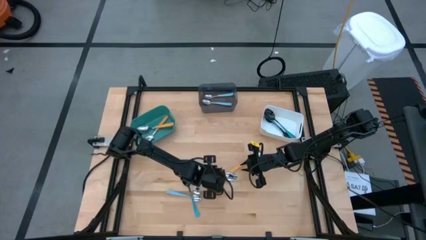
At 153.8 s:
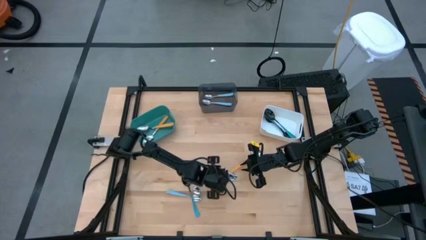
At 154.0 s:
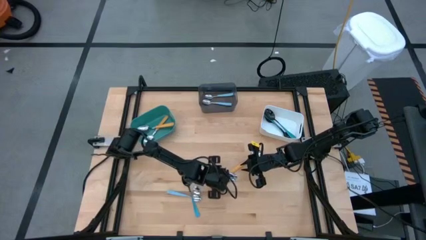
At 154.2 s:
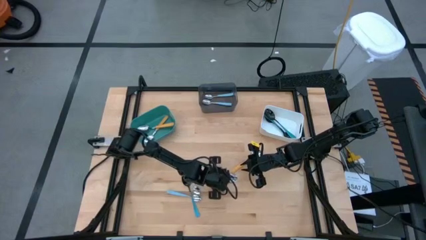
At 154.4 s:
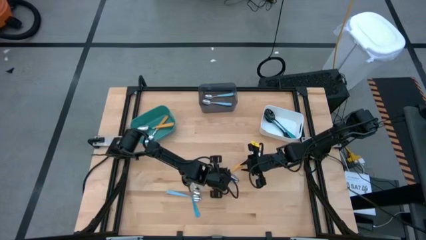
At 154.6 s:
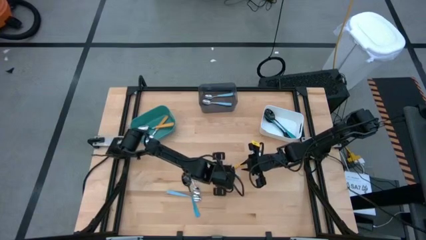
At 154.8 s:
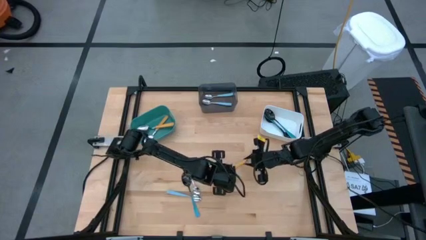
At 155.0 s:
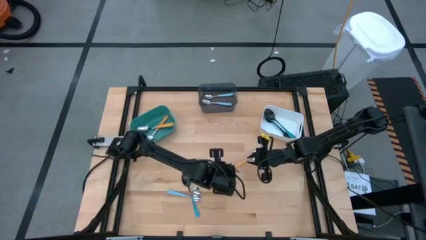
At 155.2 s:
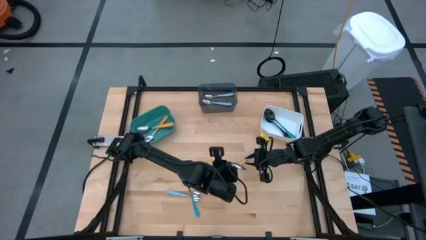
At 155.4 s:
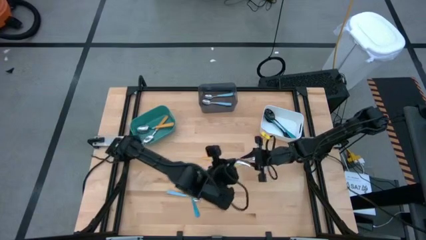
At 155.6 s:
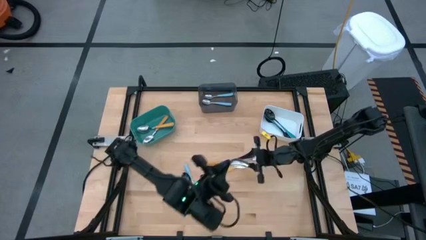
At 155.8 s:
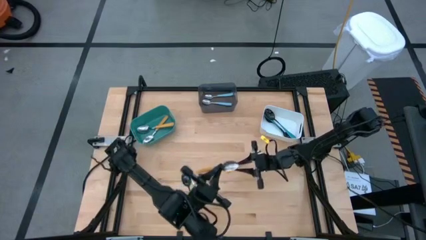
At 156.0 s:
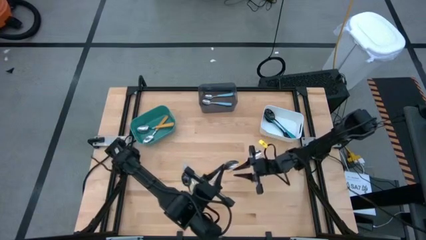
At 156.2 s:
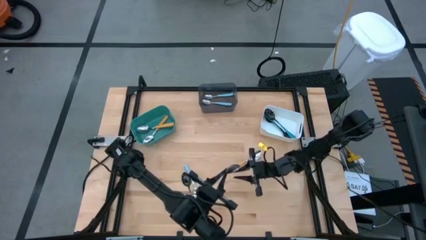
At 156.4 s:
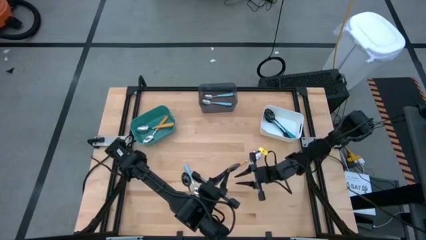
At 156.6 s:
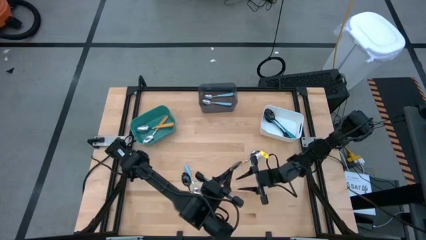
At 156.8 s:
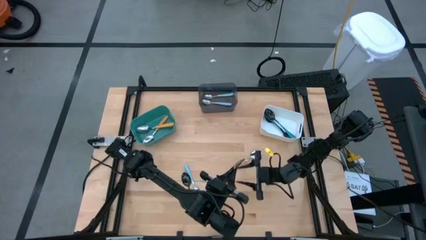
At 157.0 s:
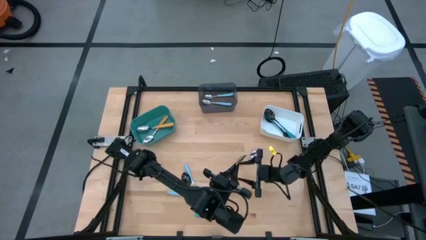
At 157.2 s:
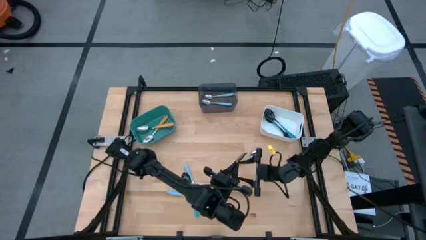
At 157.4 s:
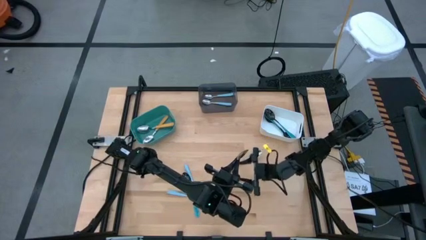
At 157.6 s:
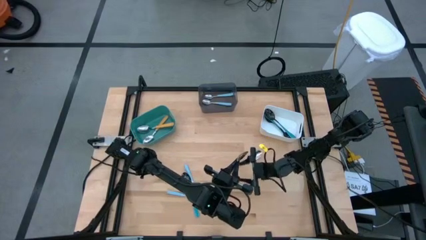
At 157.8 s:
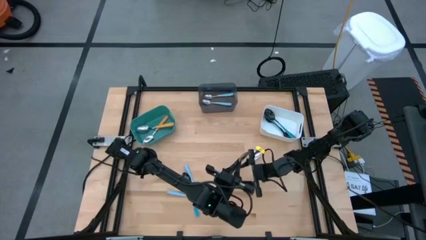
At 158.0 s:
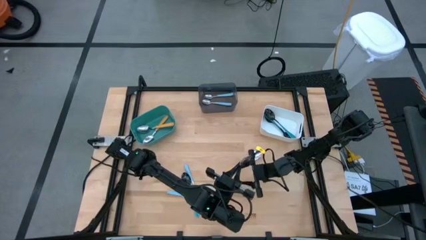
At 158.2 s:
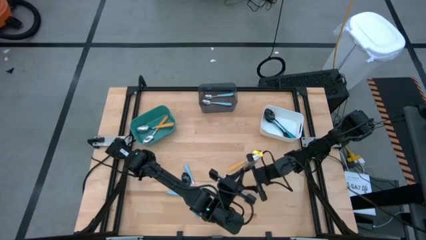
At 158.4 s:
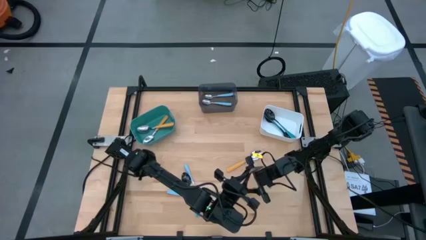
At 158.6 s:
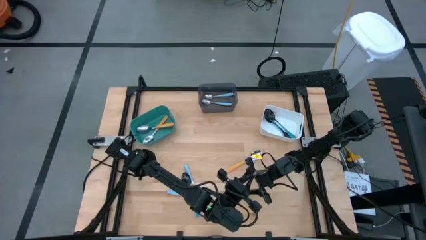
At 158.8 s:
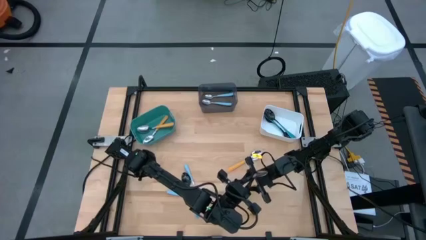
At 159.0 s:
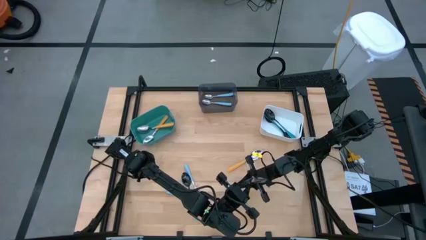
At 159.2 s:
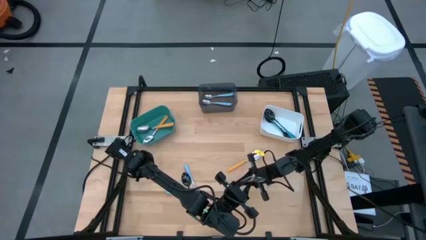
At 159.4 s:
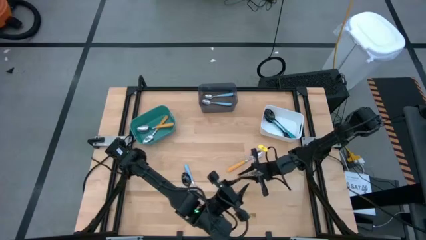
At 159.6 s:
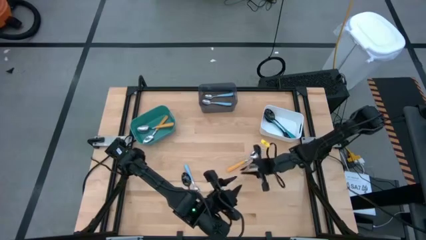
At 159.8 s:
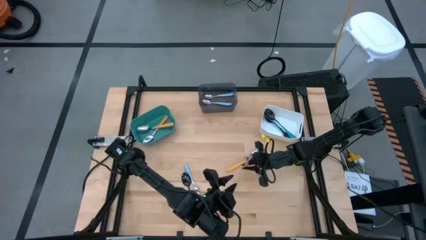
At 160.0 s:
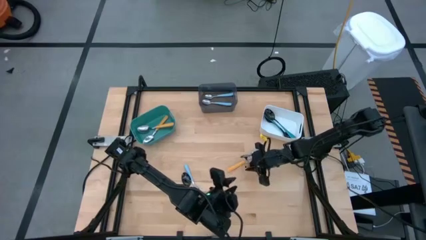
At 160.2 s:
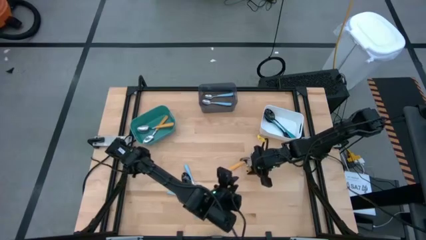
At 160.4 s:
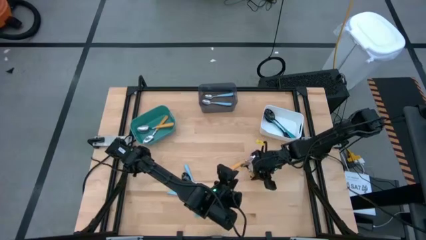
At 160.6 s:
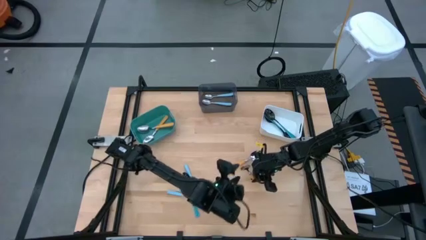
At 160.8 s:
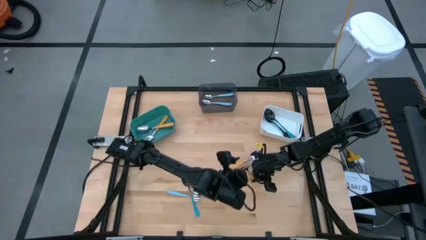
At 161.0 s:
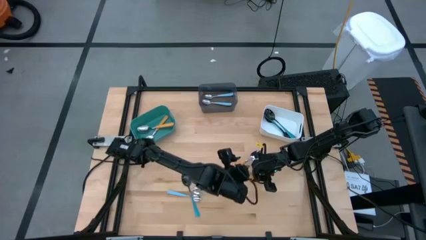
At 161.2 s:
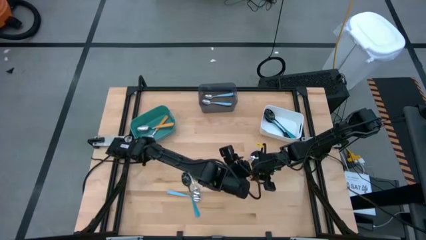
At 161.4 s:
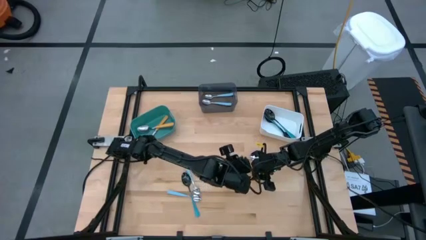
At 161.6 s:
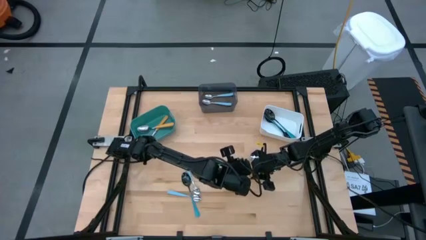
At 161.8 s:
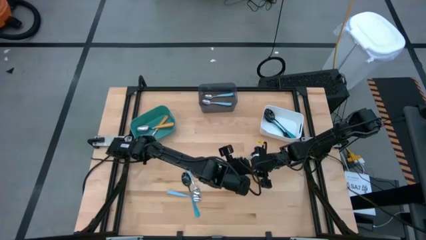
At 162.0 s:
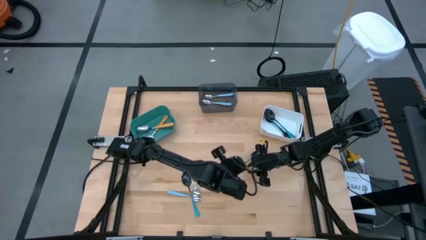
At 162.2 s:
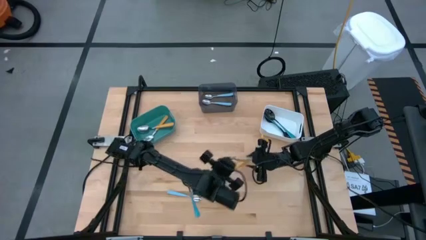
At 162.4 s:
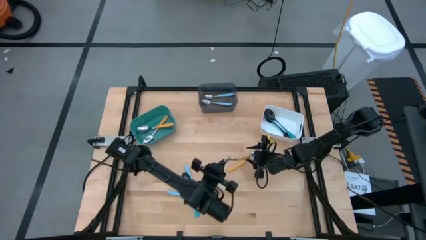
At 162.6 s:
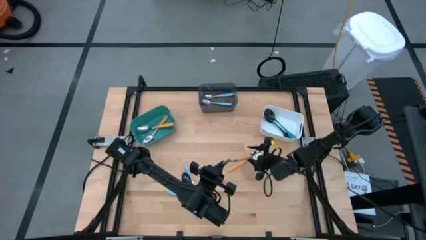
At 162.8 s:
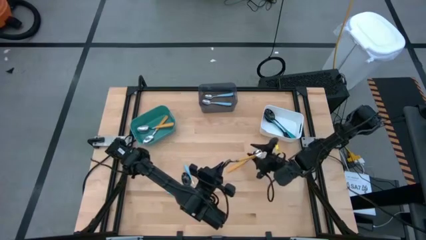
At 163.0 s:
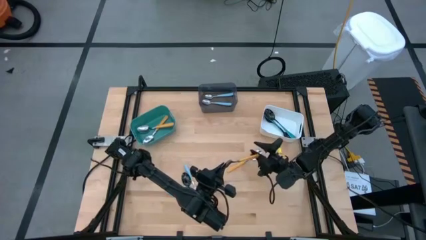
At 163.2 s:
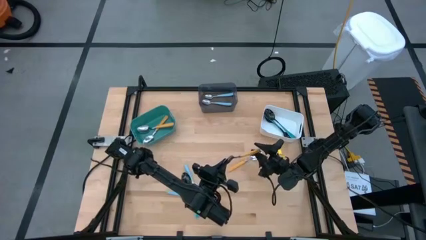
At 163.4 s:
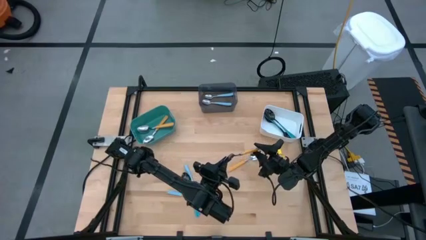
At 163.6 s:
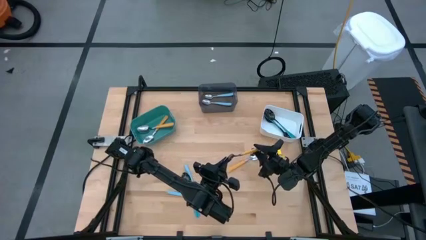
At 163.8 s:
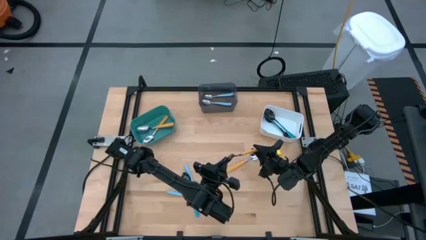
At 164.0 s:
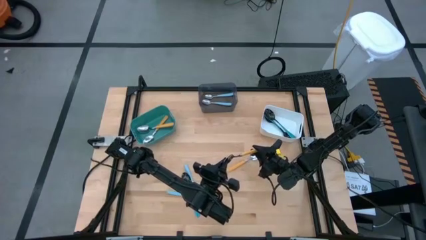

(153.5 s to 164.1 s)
Task: Sort silverware by color (type)
Put the yellow spoon into the green bin
